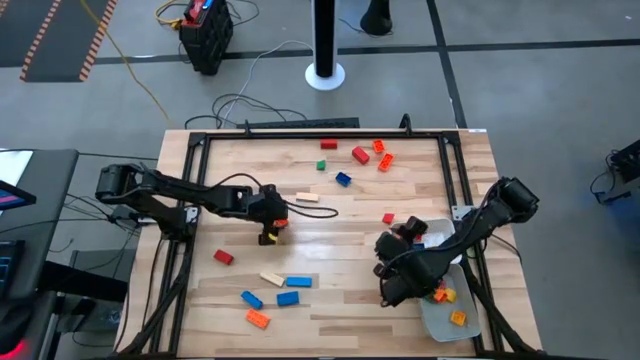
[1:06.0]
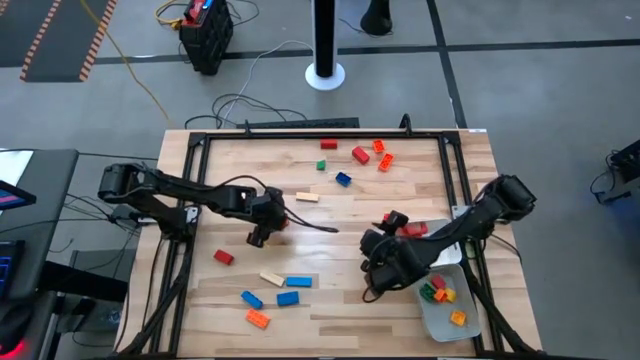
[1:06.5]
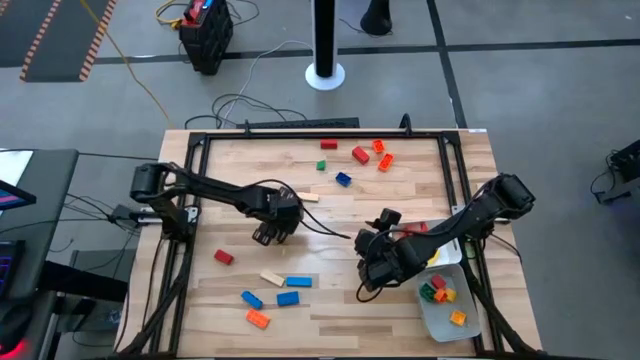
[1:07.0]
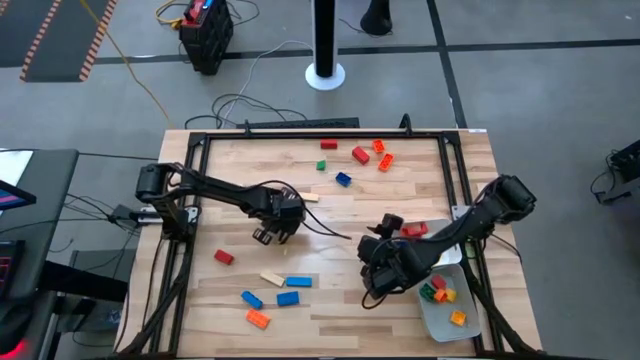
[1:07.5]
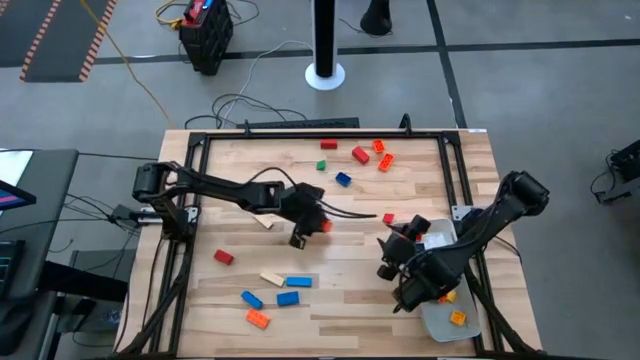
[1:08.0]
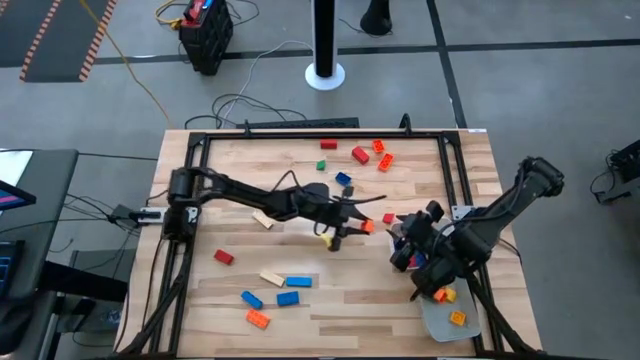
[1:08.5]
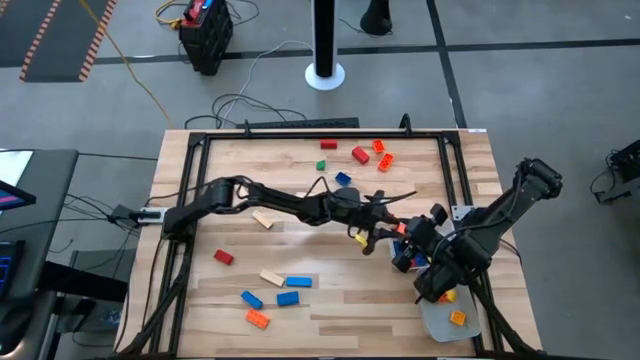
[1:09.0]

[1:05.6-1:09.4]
Task: Sort blocks by size
Put the 8 stud orange game piece into the white bin

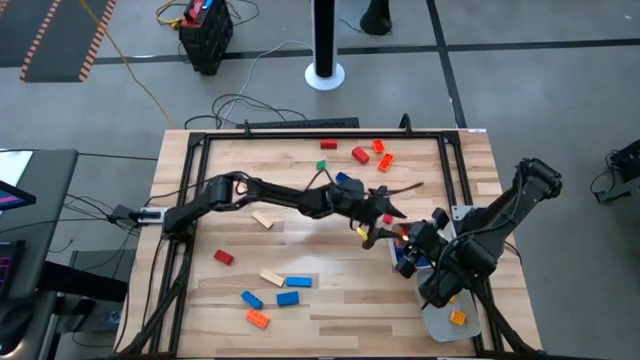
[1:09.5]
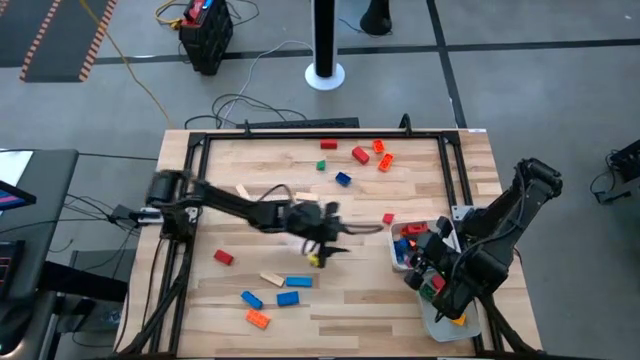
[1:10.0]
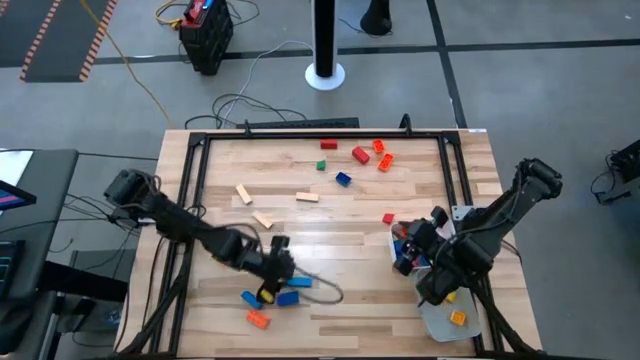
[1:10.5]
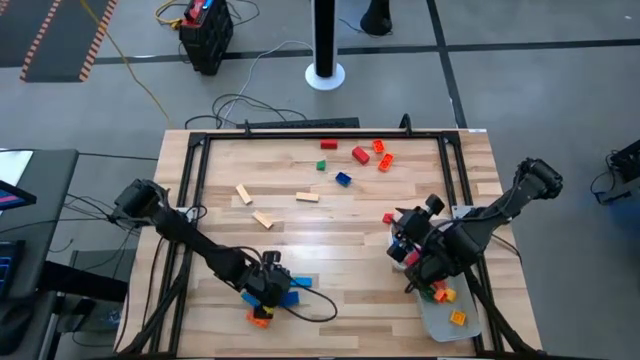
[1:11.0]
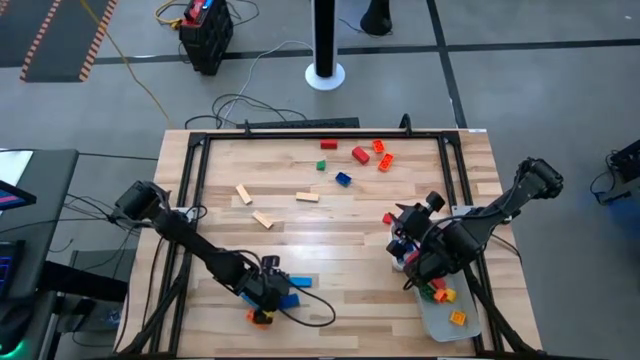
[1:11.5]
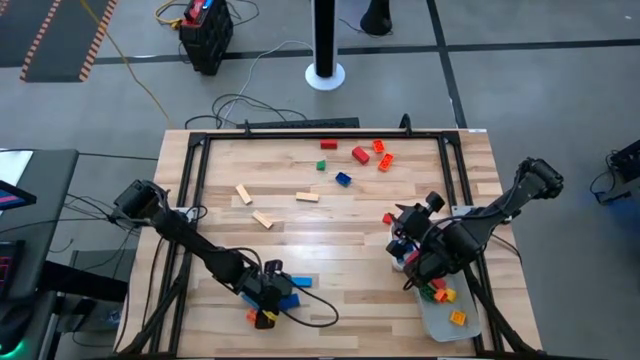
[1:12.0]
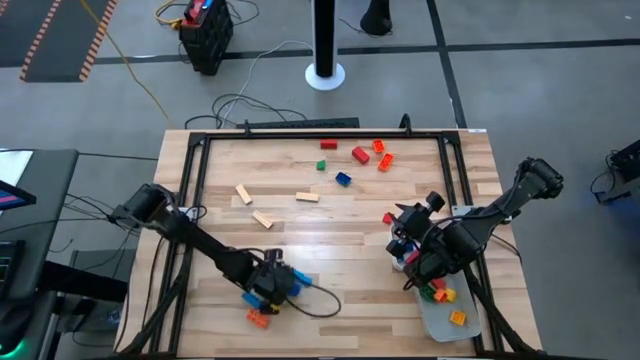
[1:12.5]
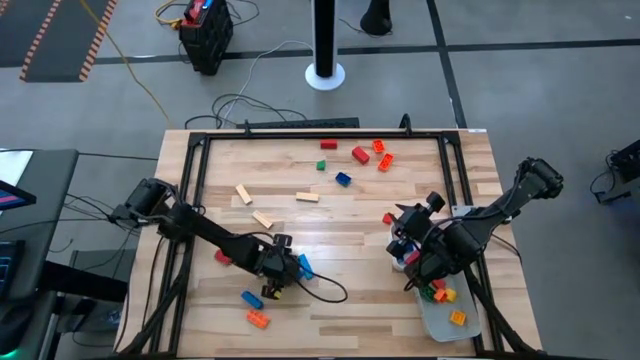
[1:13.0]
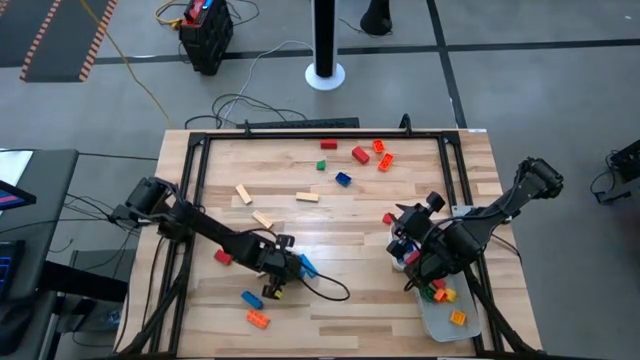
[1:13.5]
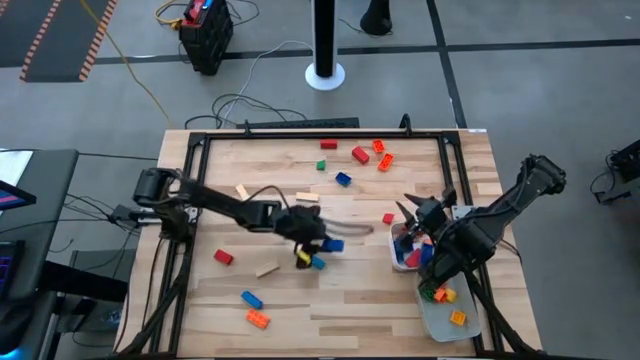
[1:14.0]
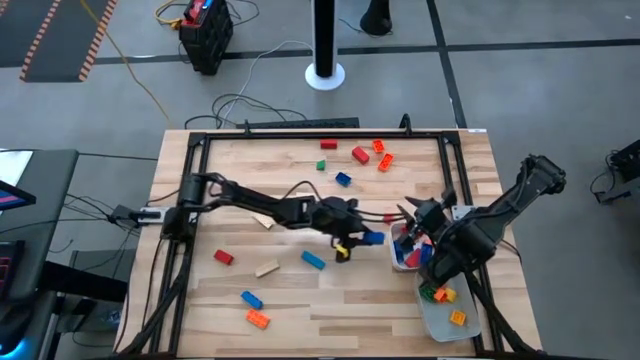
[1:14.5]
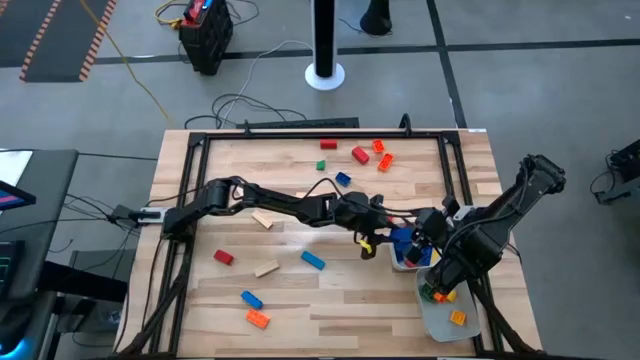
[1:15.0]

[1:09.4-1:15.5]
Put the 8 stud blue game piece into the white bin

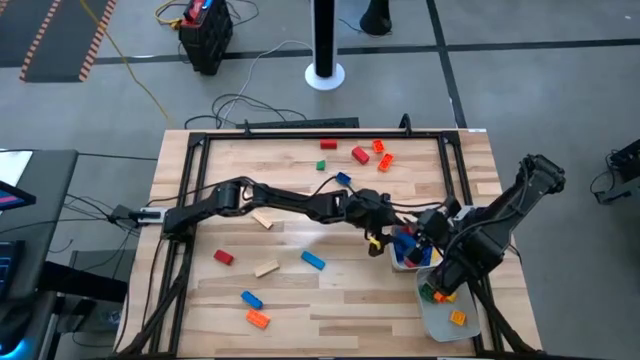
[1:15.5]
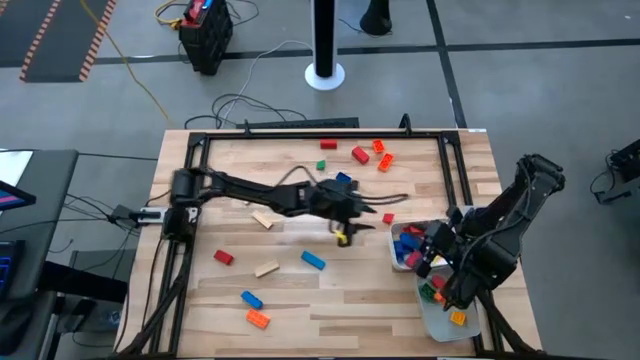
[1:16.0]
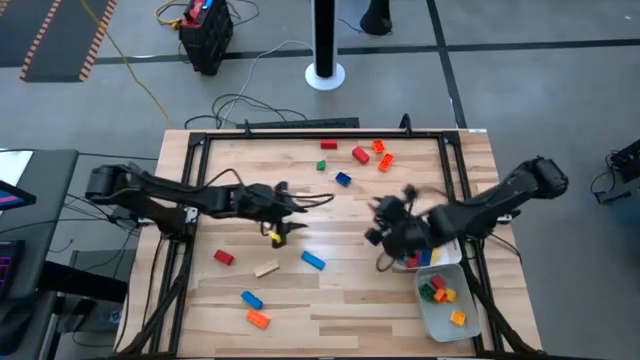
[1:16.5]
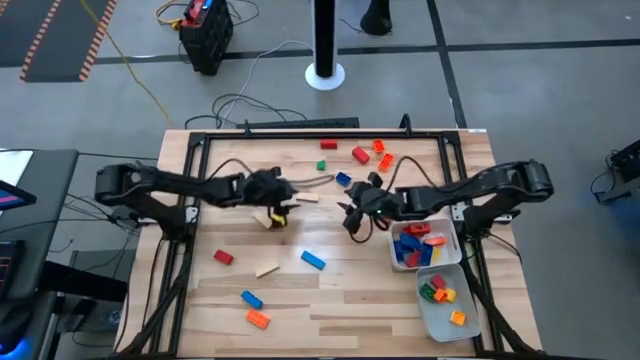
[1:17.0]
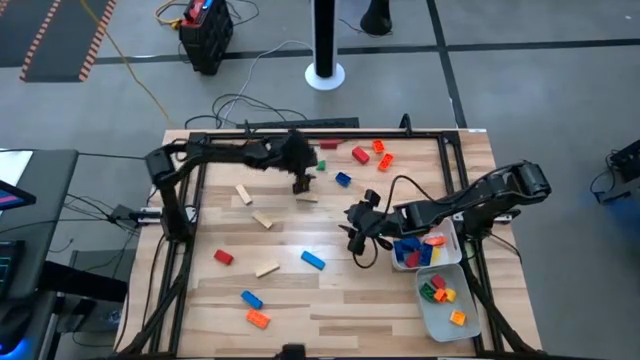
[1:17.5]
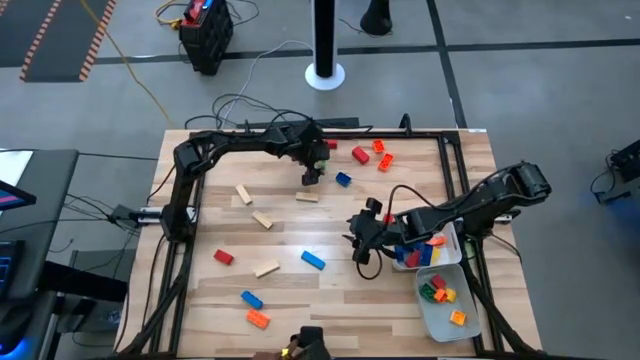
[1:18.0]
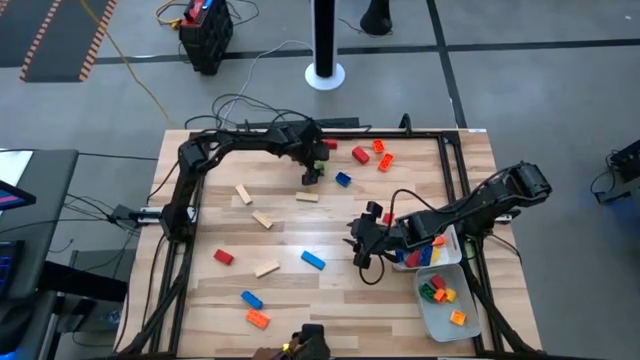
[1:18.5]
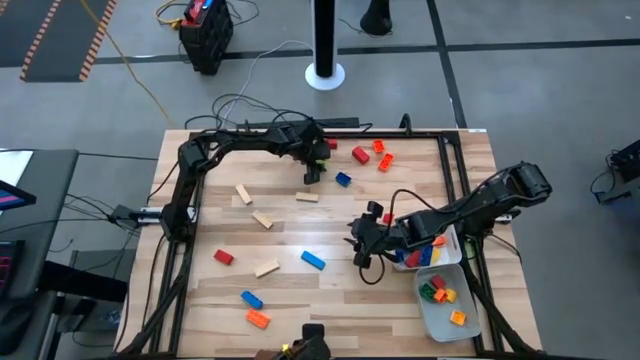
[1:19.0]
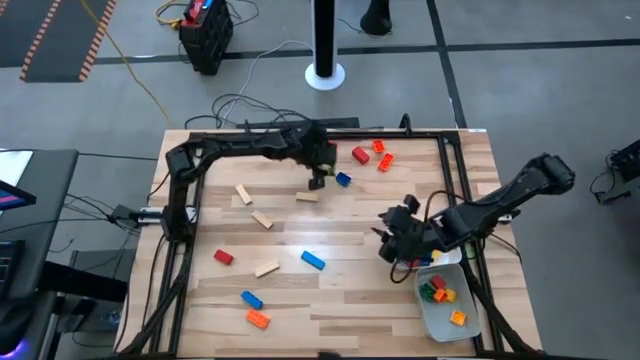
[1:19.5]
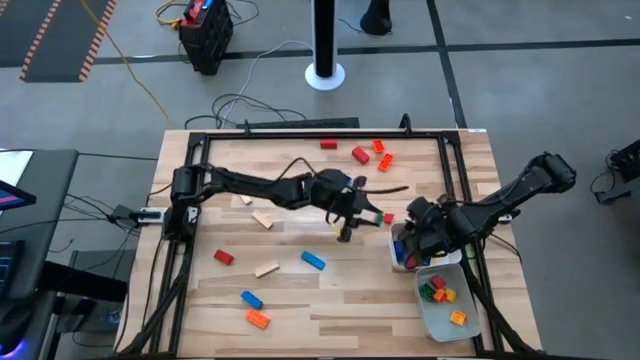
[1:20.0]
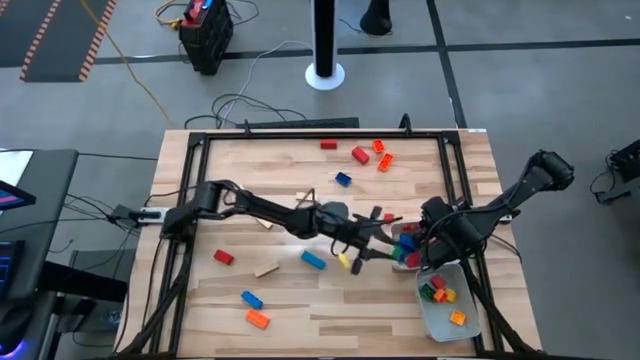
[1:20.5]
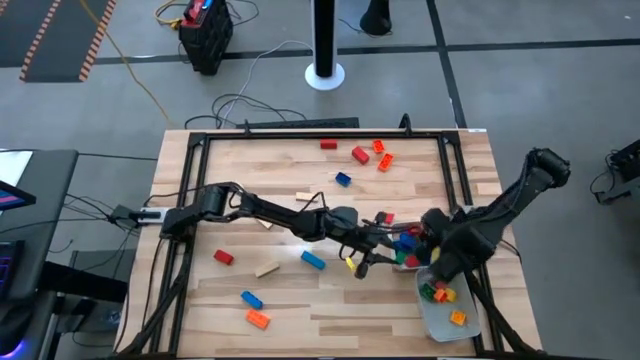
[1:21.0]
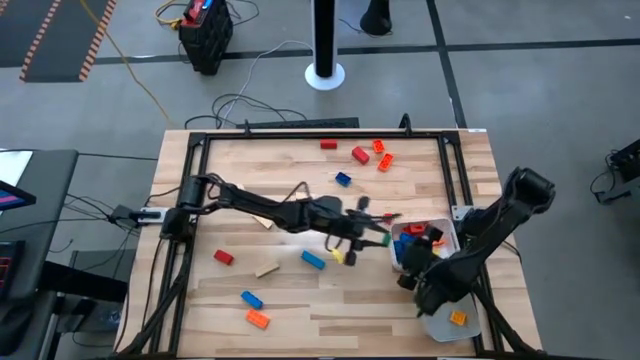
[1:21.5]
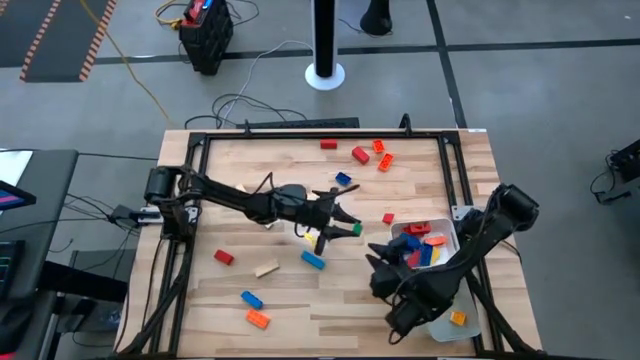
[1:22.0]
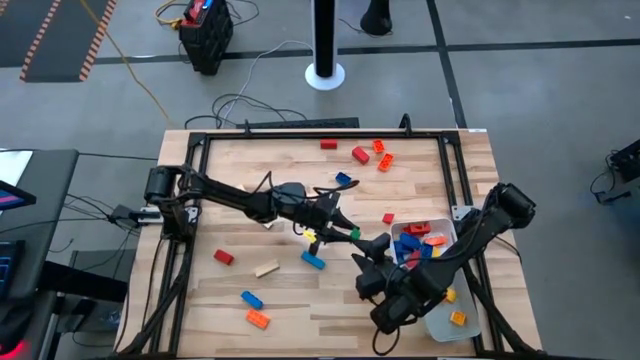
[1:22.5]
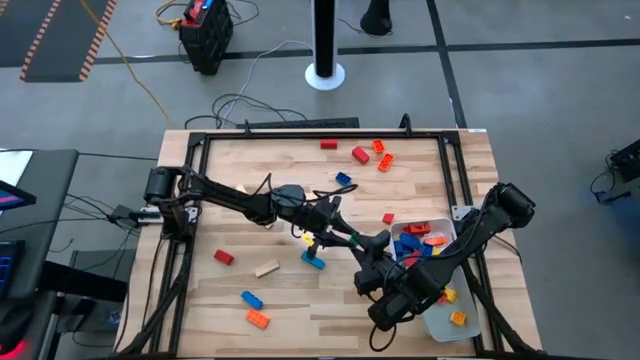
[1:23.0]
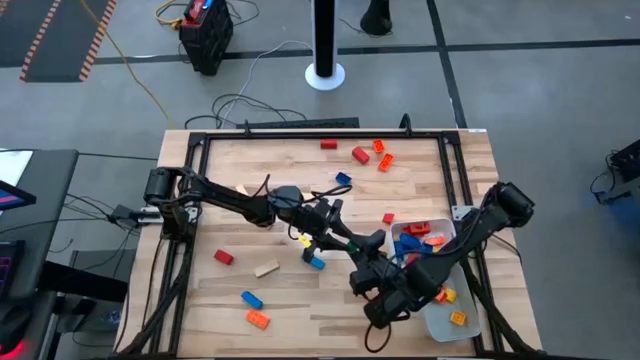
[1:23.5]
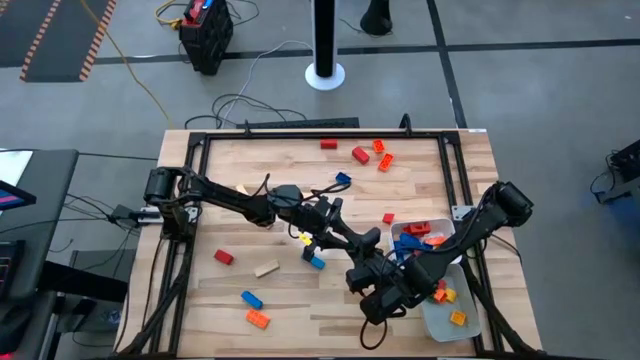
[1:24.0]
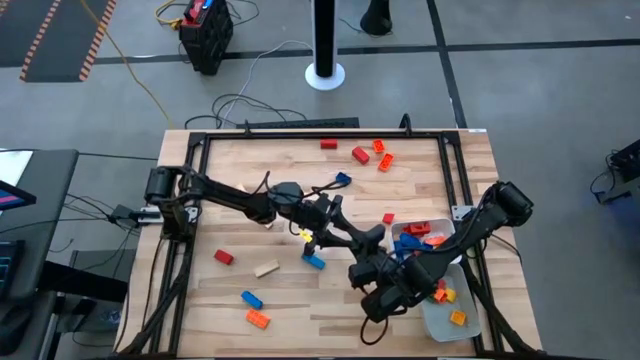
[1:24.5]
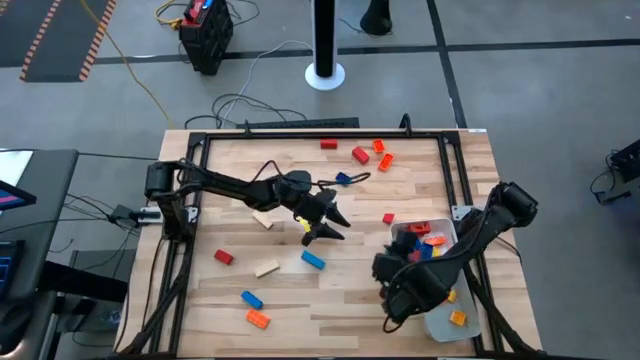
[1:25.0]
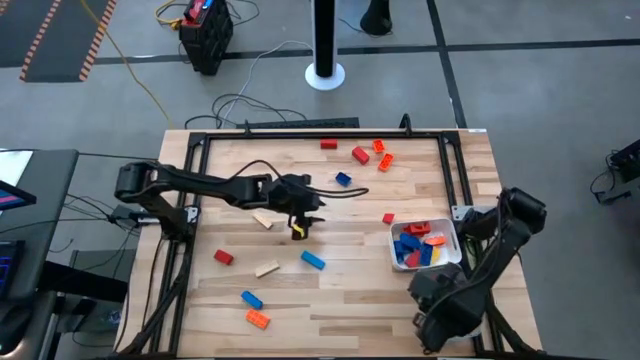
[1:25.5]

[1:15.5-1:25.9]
Put the green block into the grey bin
